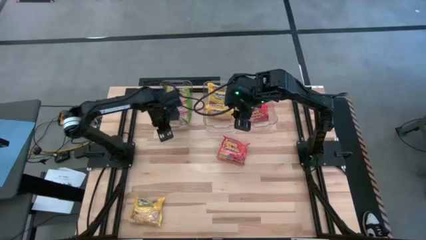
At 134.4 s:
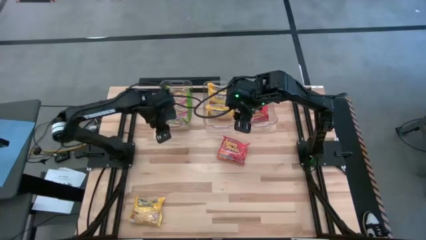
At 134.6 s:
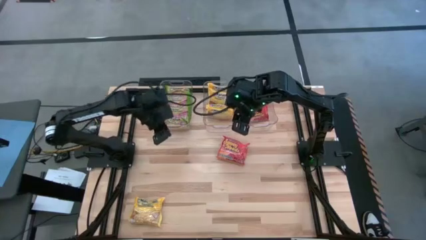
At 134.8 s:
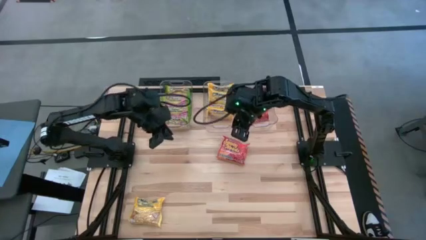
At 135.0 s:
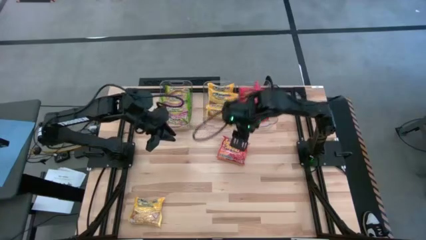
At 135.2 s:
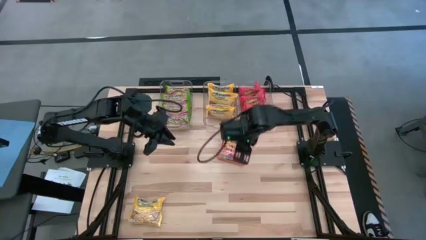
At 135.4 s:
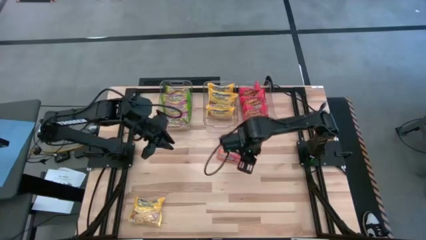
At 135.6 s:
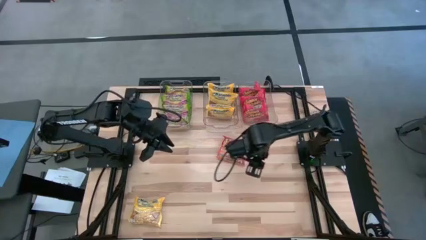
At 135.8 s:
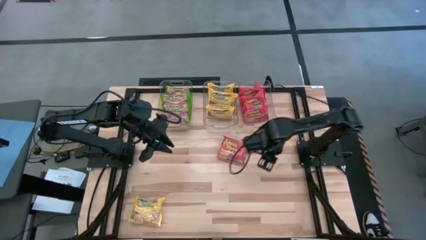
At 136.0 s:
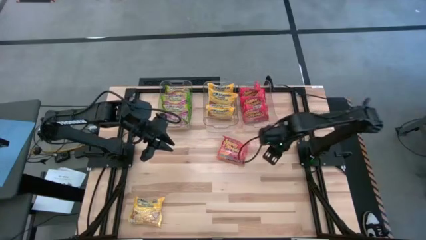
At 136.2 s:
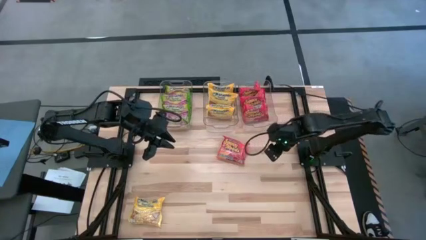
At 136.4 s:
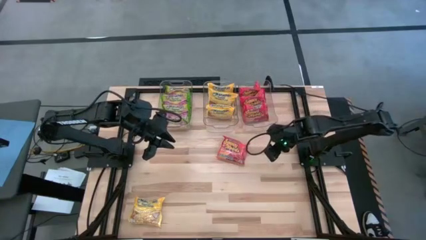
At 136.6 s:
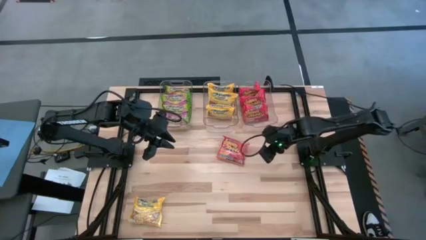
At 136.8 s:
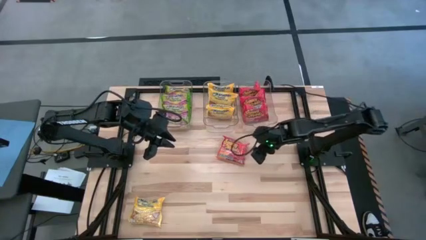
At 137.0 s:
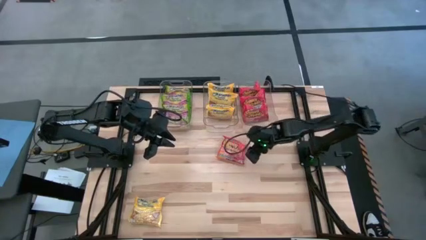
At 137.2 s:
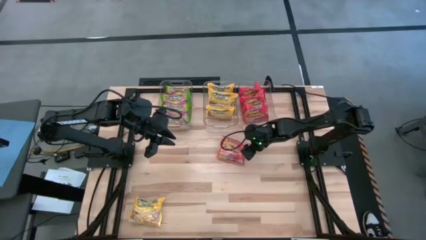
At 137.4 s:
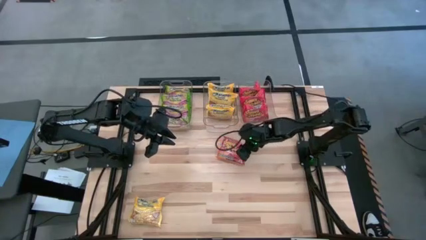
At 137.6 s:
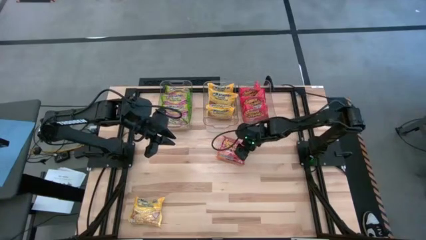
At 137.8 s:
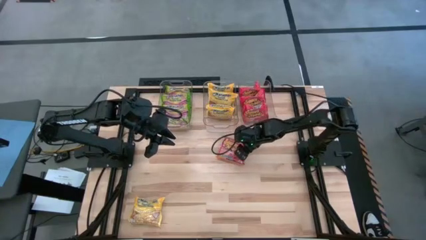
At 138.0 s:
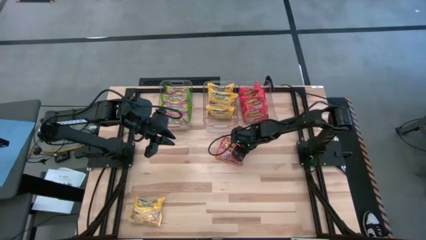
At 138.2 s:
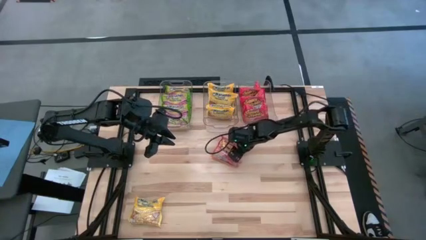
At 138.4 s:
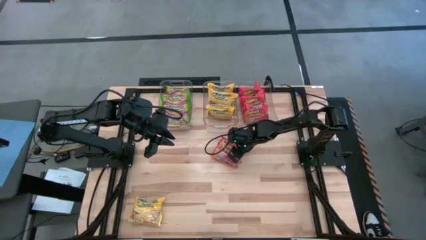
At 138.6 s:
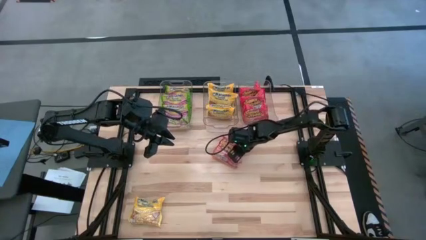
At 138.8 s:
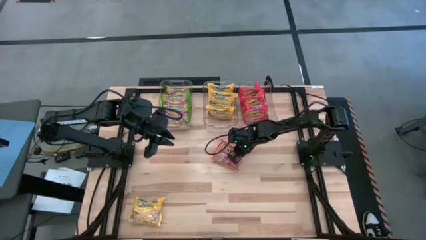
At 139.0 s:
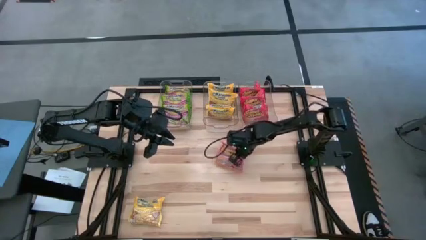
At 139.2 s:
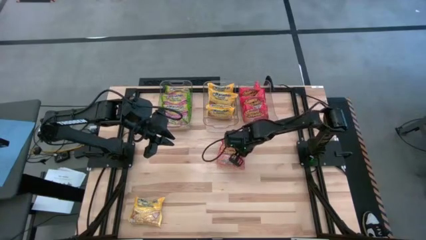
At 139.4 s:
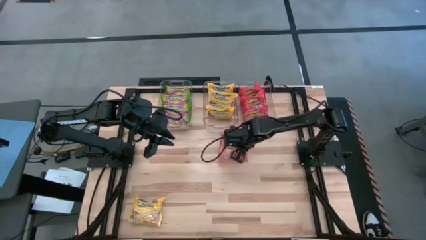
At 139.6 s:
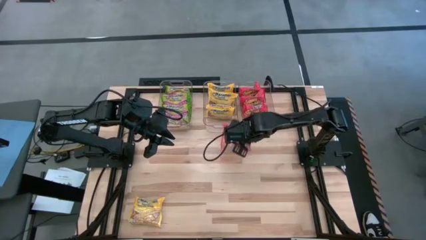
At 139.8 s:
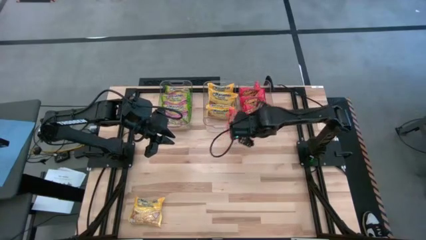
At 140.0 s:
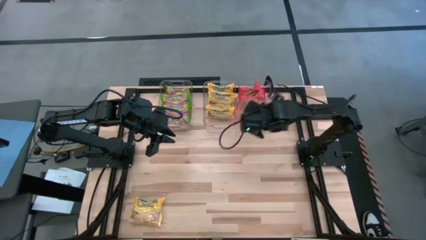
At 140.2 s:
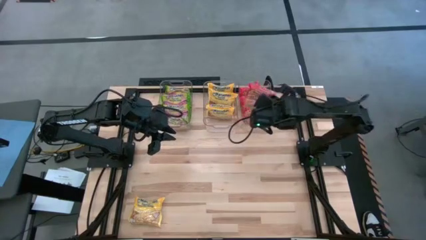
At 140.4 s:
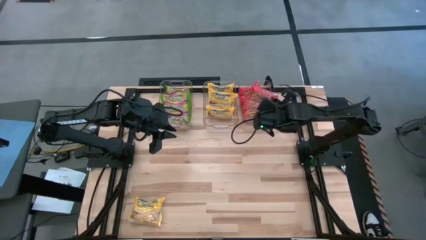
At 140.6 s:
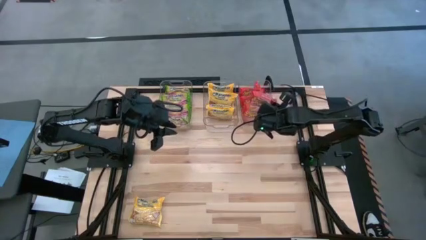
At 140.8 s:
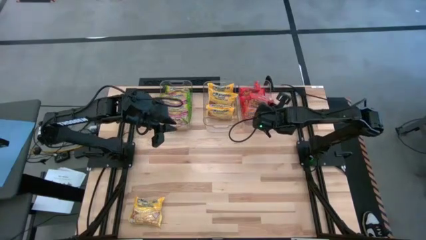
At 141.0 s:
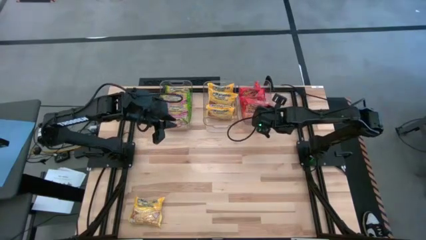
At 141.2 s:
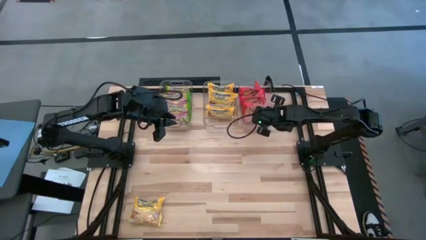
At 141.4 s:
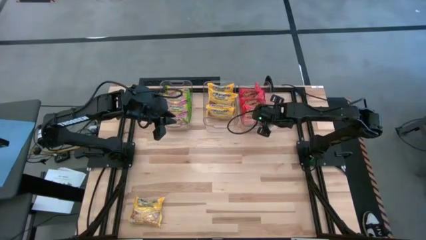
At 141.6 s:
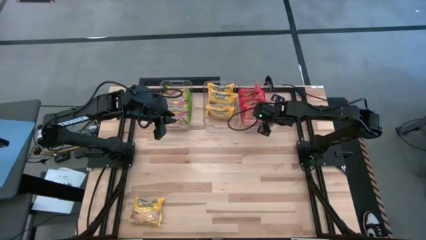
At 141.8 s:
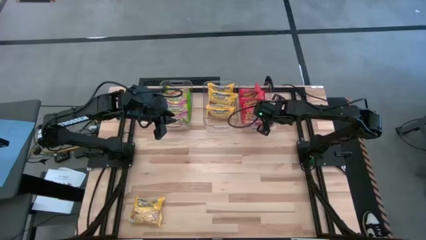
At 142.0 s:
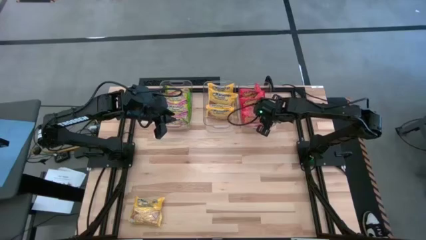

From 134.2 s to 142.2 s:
Task: Sort Maruchan noodles
Put the red noodle pack into the right transparent bin

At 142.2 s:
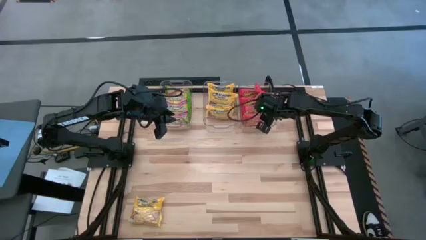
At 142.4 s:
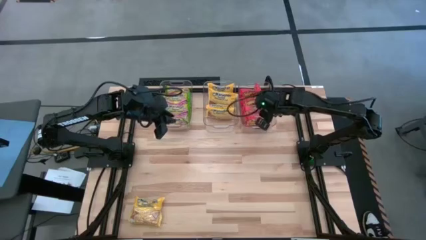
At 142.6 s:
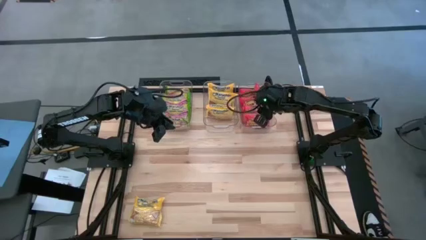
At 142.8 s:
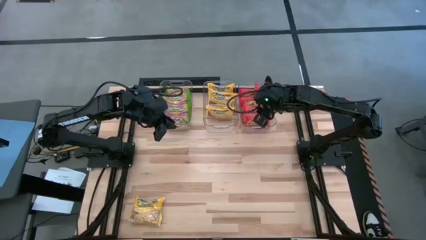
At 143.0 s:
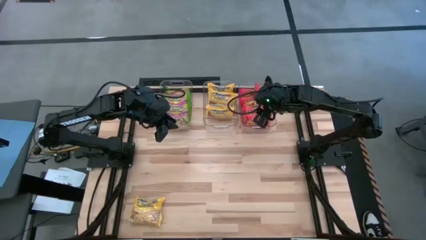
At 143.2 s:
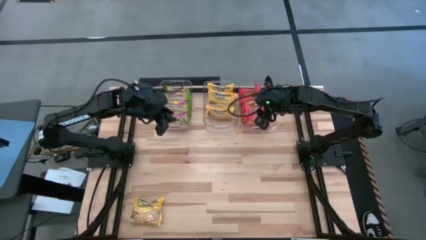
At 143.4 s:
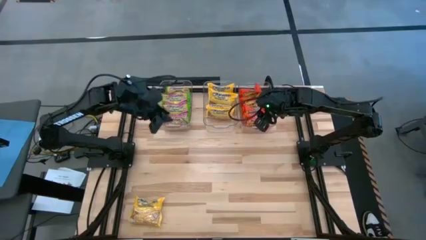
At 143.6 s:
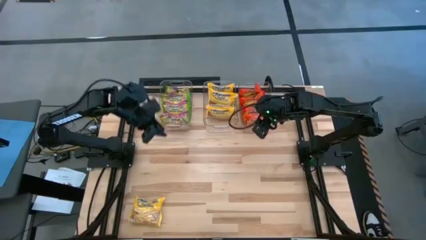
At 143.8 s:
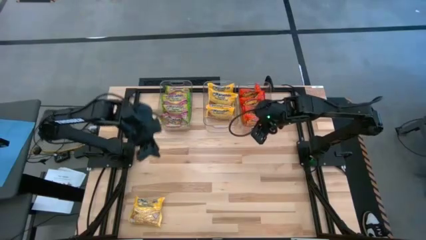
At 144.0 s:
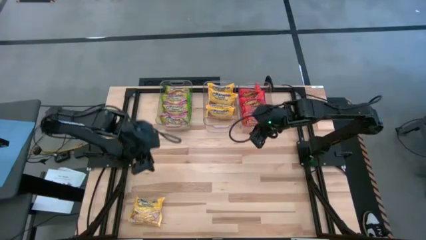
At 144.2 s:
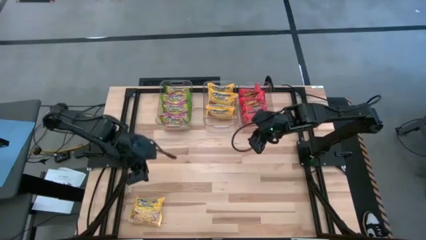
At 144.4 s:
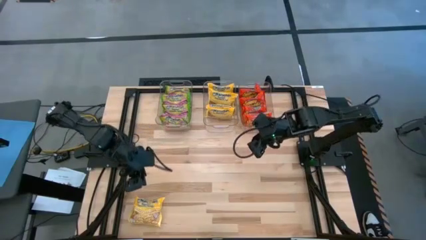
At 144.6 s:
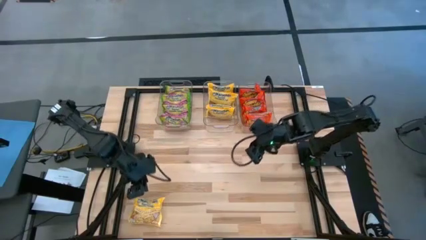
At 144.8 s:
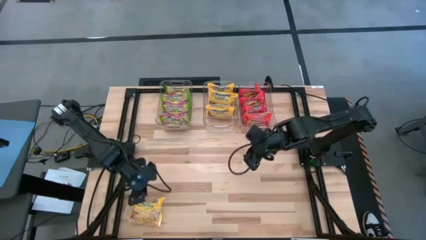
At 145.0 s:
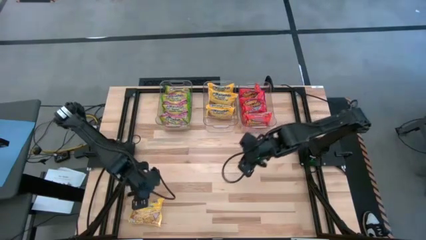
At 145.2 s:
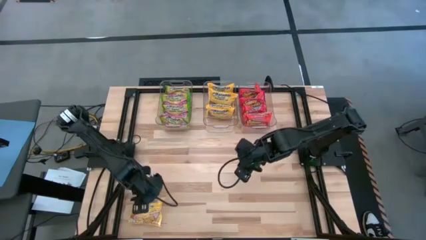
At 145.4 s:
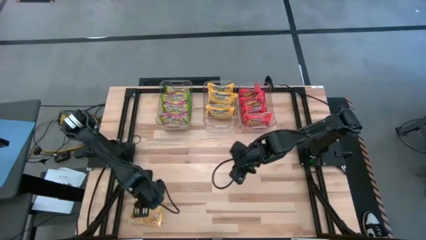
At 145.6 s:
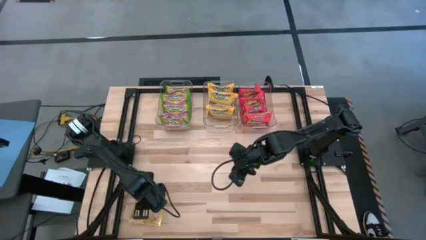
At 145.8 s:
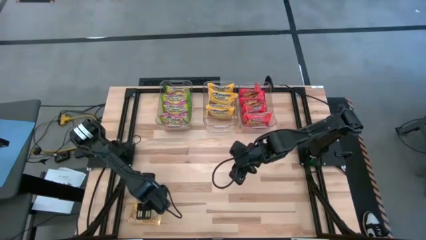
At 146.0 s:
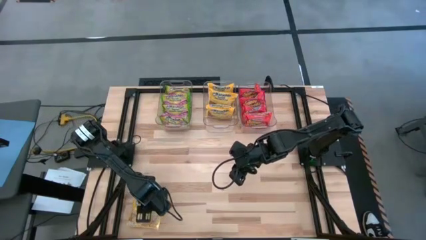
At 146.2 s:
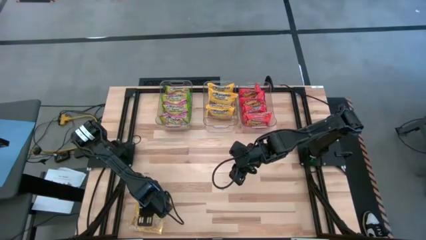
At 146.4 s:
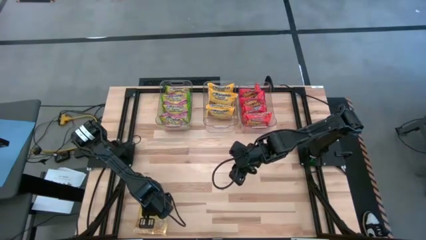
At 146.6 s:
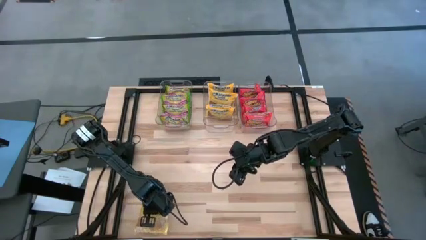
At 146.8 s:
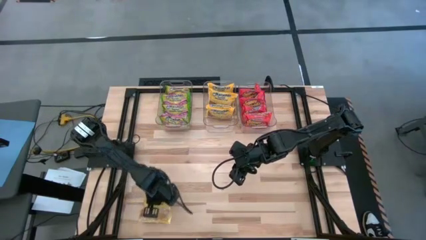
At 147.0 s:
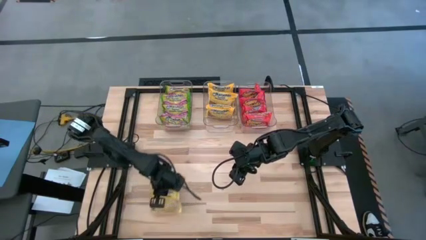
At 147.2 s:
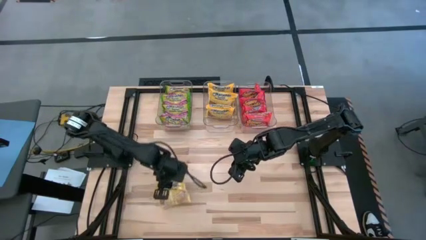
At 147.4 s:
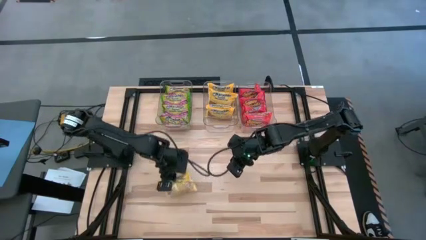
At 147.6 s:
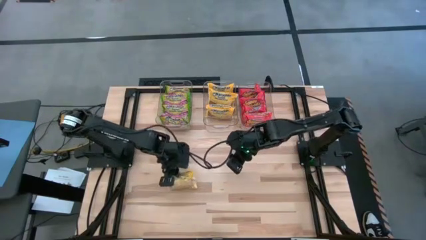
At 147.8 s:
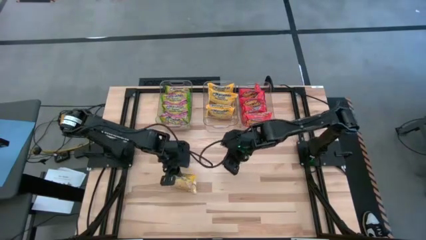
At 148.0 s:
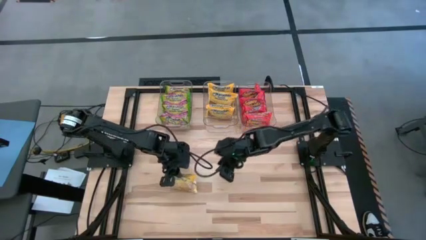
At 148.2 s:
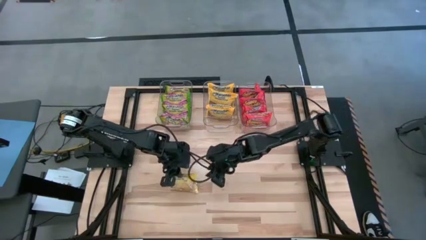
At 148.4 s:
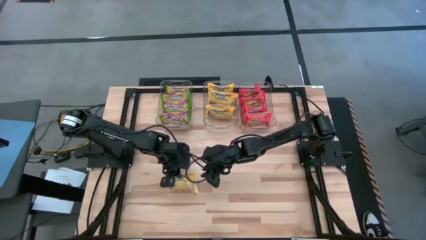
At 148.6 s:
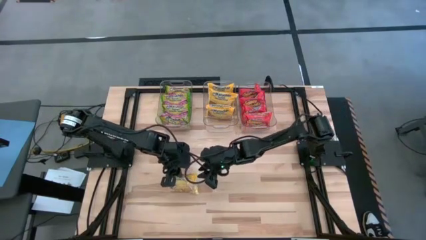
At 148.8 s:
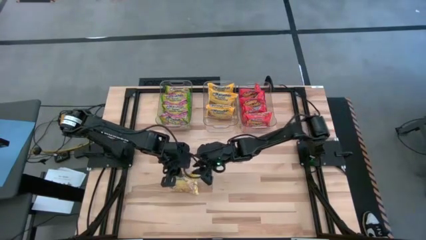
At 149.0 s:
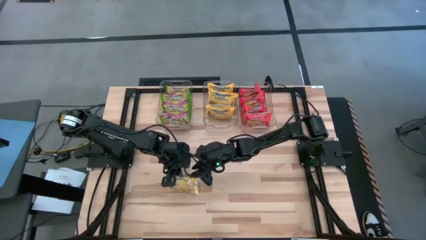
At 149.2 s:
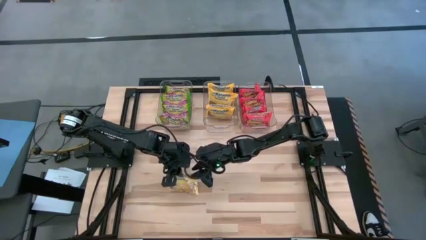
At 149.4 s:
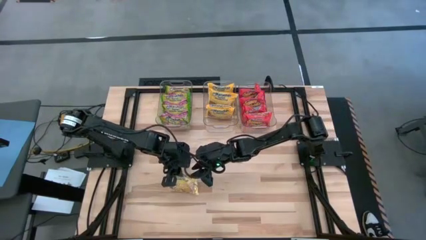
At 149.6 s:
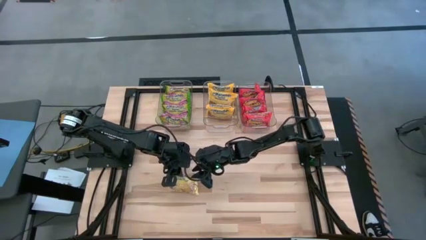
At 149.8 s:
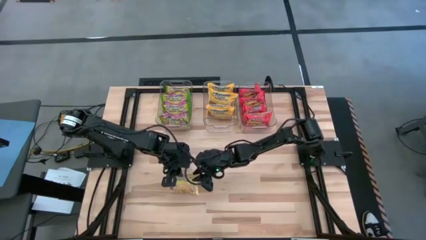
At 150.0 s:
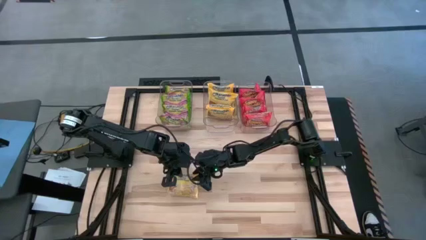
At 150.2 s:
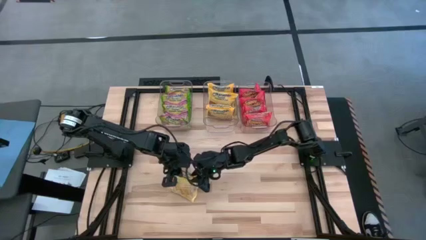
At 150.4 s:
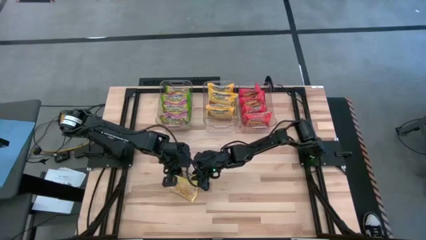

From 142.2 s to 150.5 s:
Put the yellow noodle pack into the middle transparent bin
